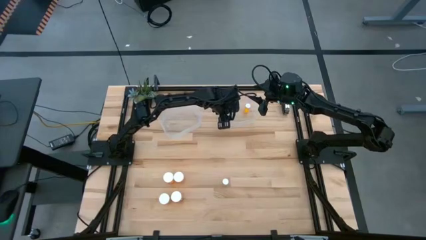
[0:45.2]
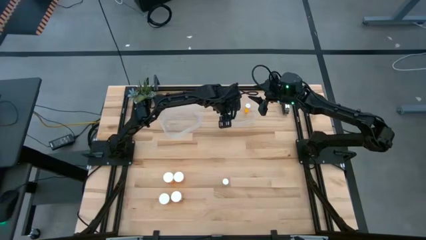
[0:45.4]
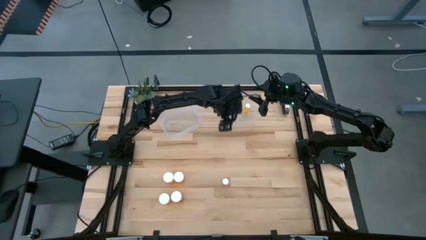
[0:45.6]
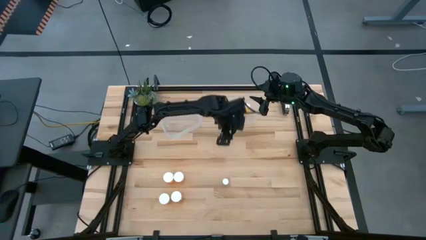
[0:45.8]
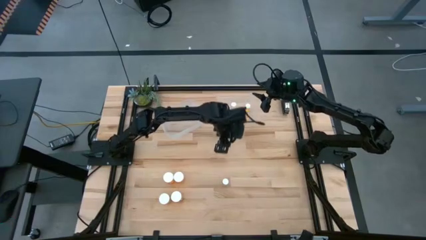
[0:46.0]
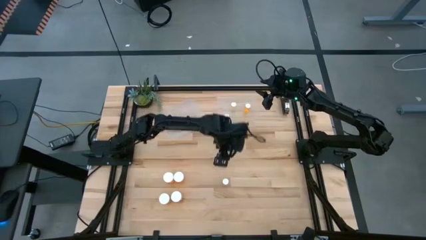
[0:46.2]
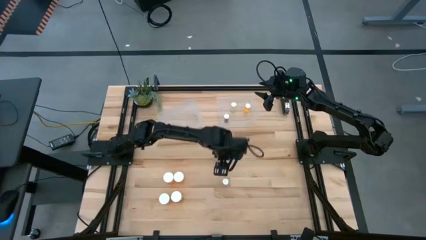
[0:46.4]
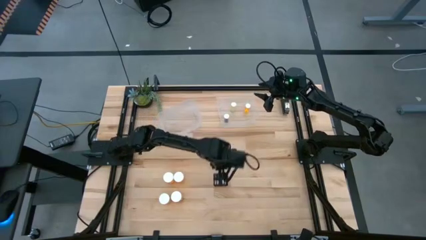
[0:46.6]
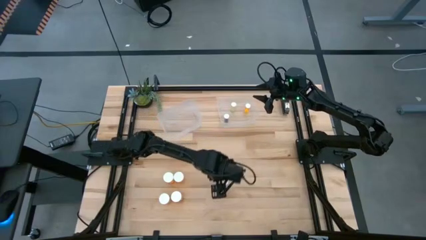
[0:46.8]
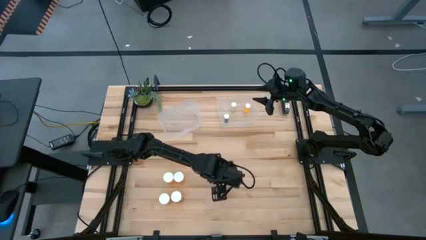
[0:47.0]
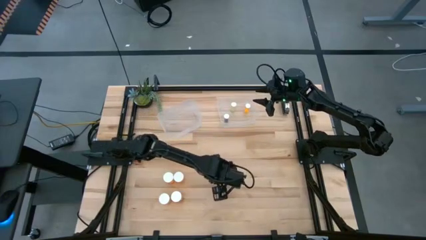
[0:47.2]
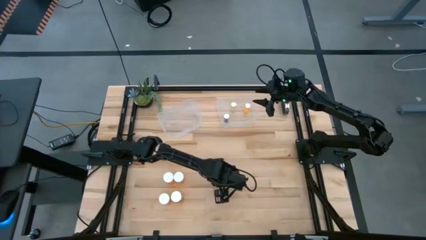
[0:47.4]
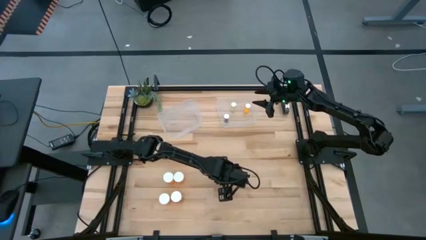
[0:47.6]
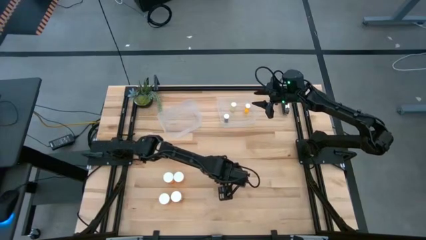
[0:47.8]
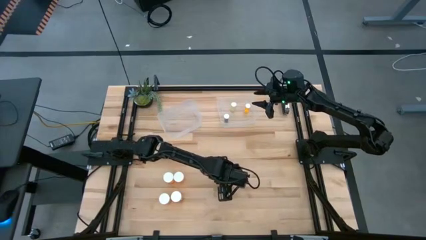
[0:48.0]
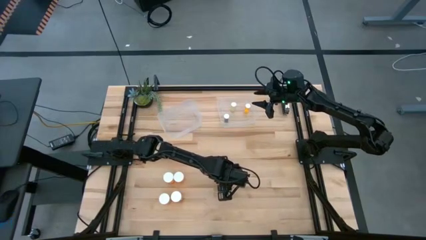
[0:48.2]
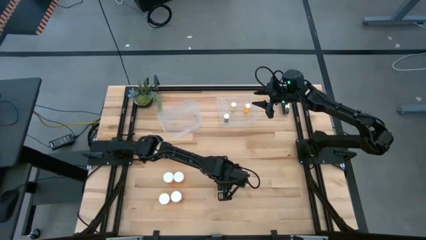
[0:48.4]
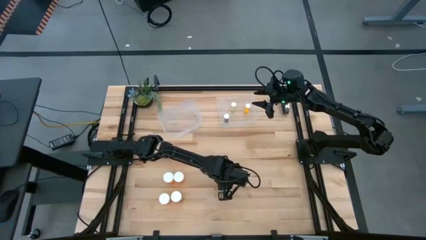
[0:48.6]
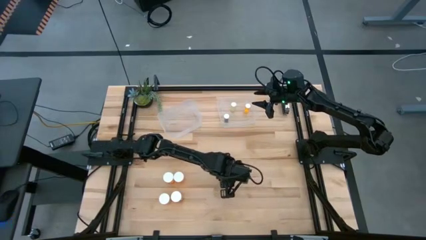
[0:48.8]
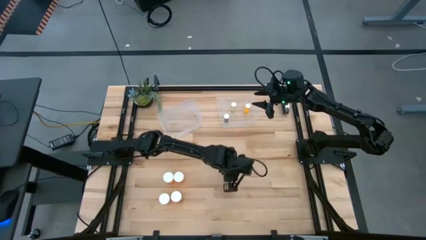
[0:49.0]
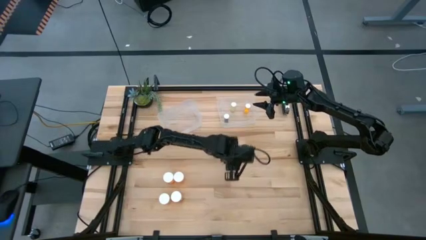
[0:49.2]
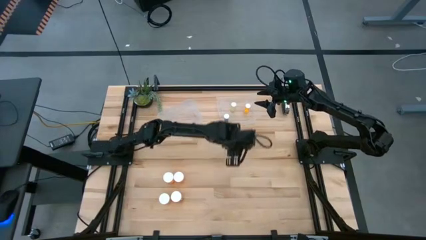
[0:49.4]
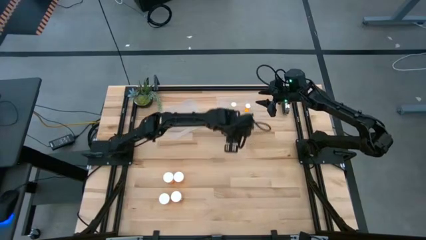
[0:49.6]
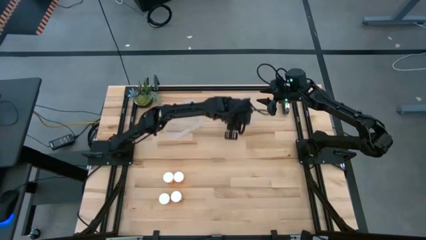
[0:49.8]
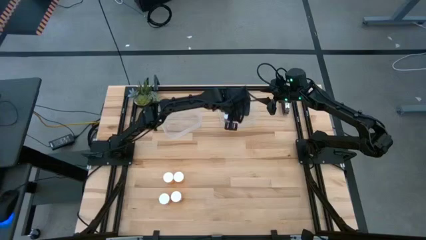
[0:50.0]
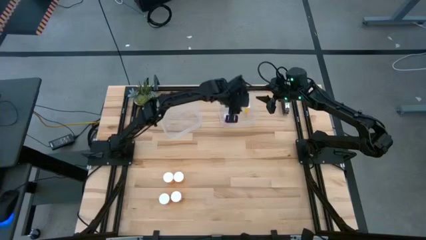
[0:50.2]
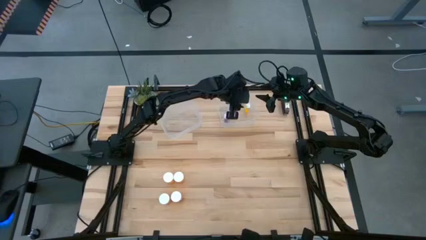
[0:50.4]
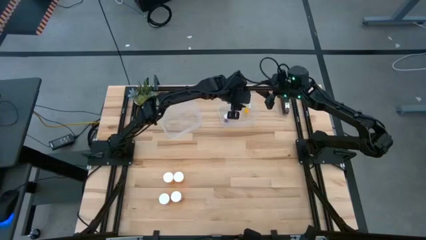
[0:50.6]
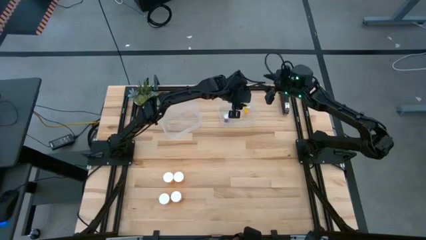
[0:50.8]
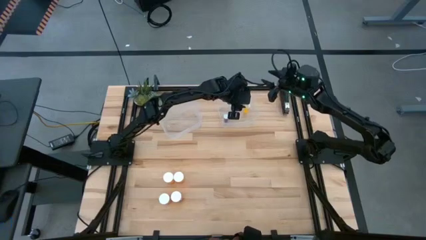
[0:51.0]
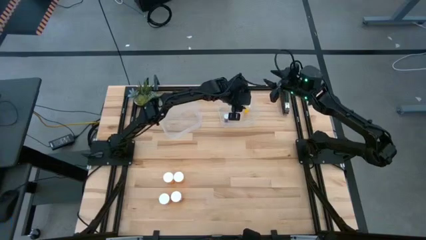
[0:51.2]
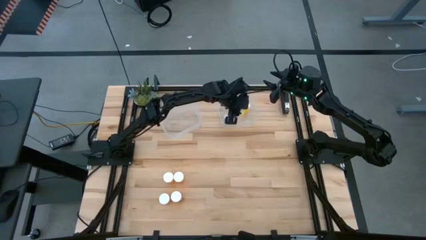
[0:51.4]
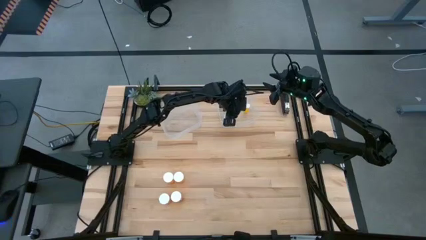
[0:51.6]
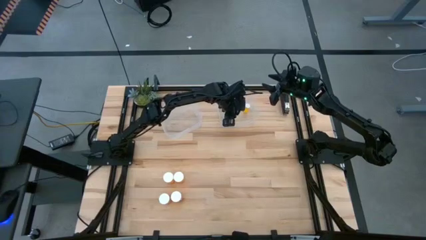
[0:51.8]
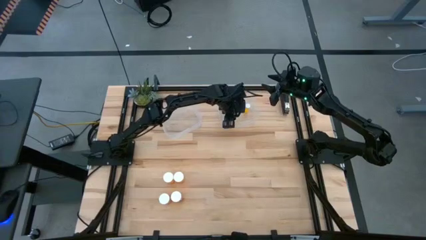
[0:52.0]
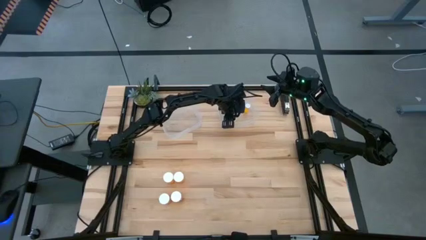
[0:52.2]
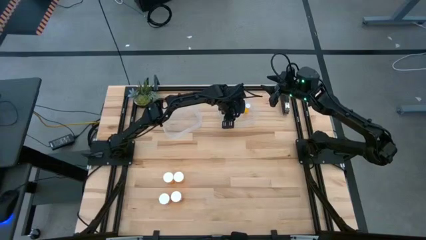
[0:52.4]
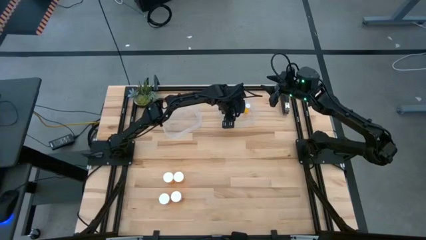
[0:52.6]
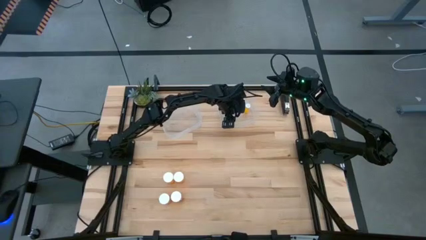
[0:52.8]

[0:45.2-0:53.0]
Task: Pick and place medicine bottles into bin by pill shape (circle, oval)
Put the yellow pill bottle into the right transparent bin

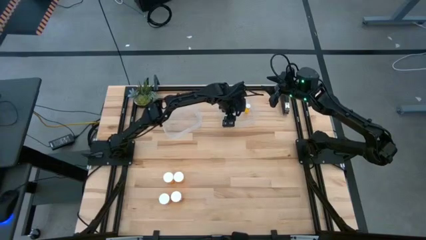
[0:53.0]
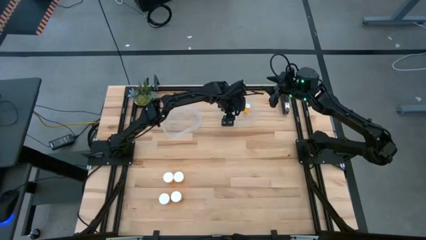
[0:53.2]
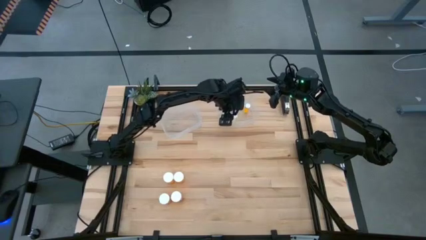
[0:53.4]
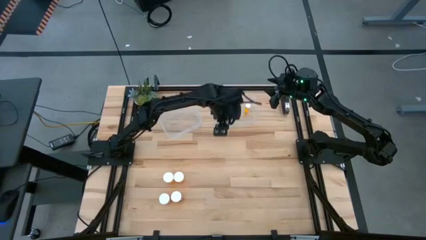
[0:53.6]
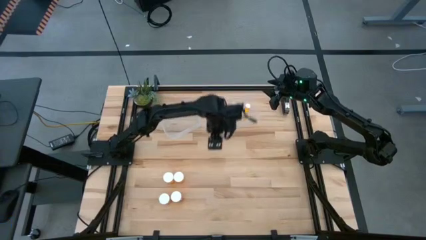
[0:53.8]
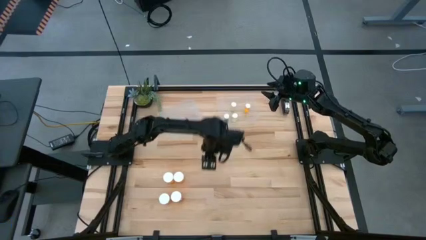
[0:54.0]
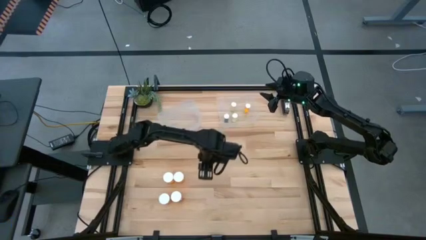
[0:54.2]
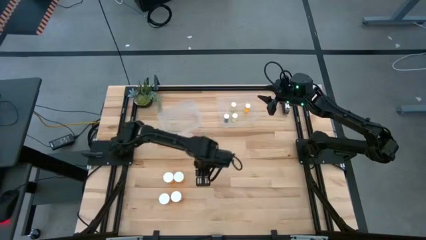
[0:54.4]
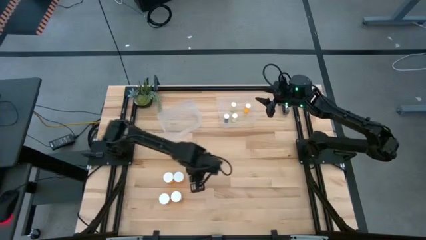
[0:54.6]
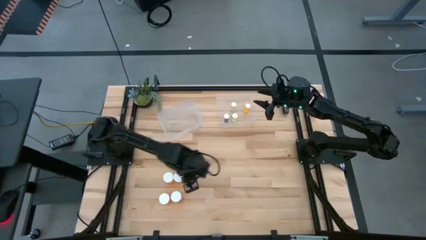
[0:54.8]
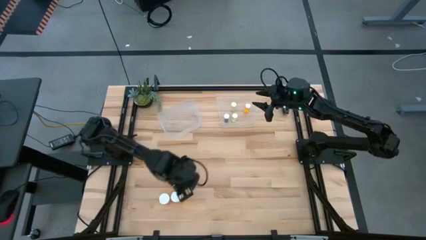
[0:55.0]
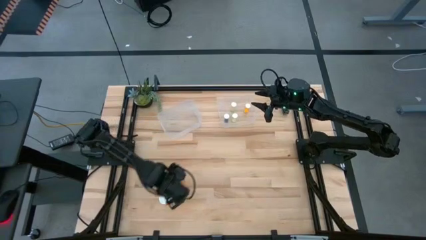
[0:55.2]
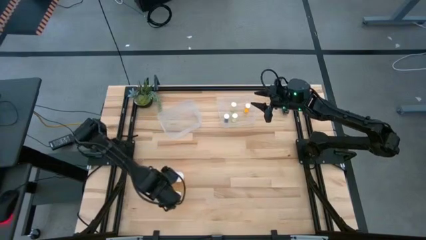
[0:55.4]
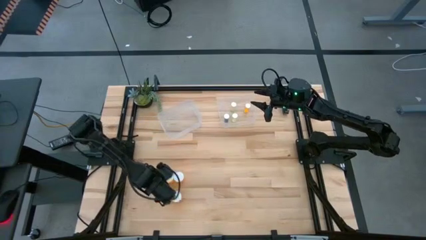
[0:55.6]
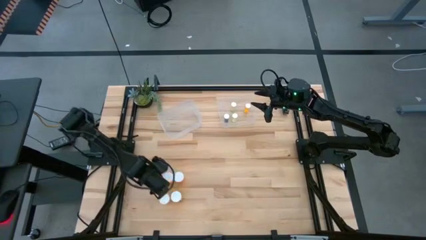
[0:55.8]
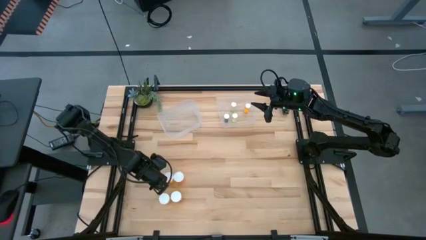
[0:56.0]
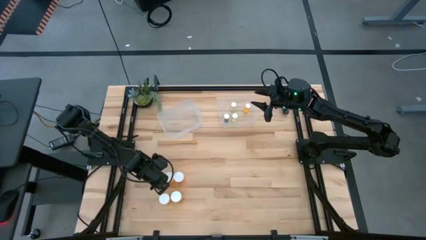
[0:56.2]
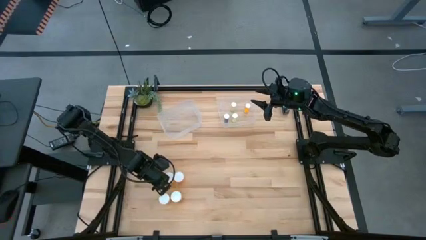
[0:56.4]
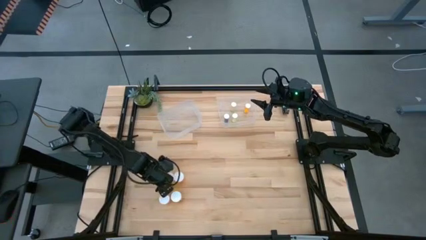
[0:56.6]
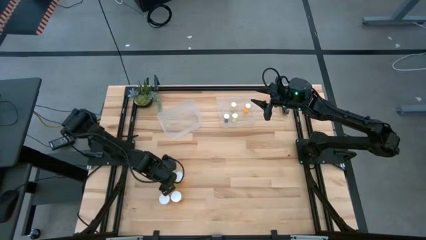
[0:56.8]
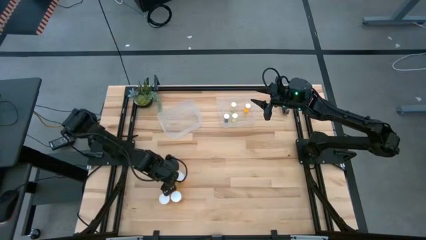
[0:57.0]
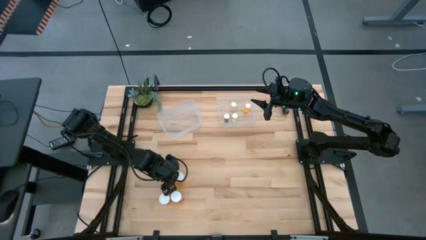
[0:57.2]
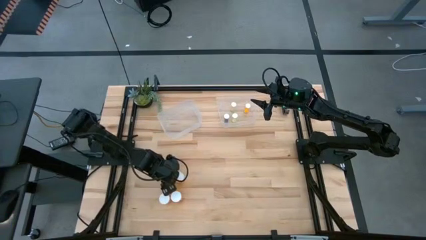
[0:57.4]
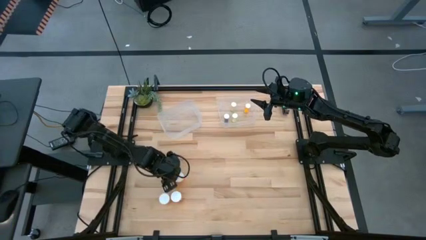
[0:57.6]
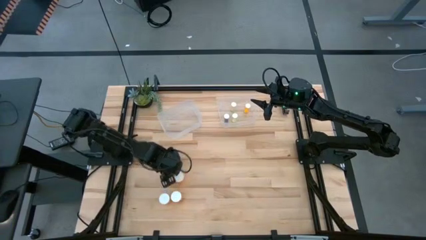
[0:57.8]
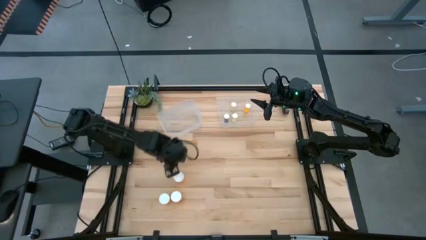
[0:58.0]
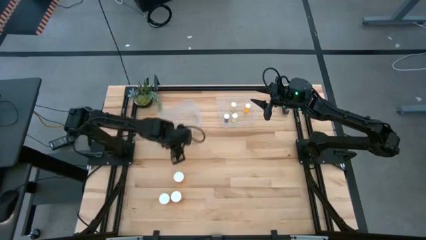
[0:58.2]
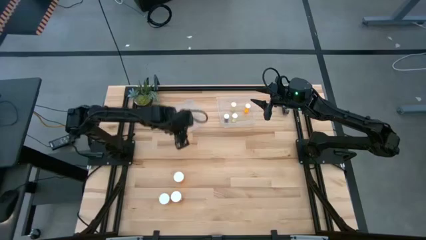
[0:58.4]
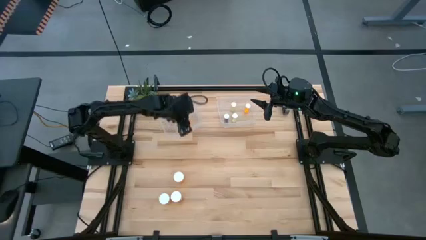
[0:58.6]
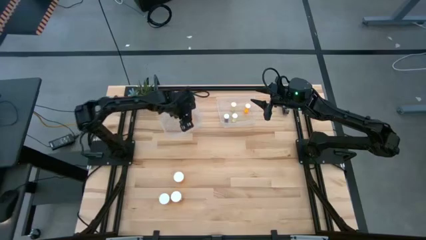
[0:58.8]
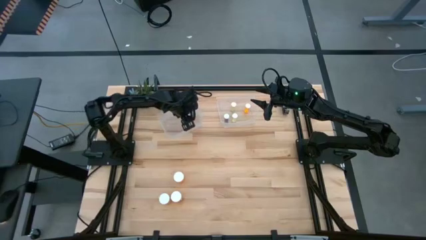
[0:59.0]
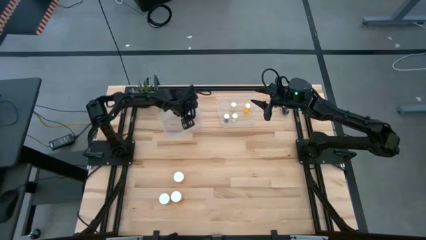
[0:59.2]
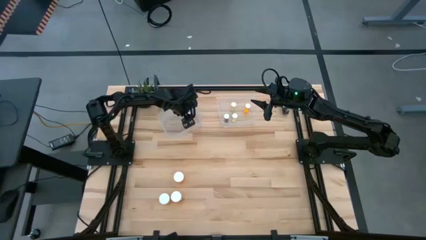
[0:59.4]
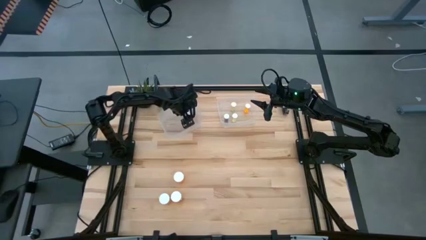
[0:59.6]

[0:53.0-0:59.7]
Put the orange pill bottle into the left transparent bin

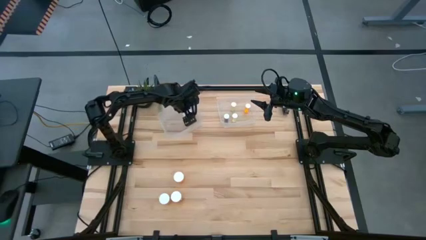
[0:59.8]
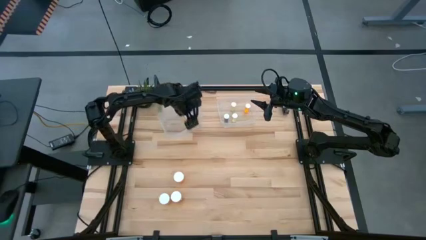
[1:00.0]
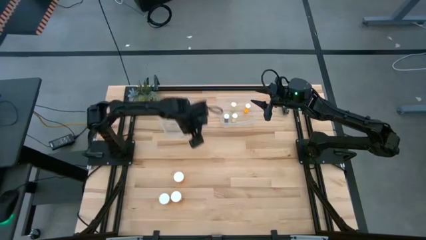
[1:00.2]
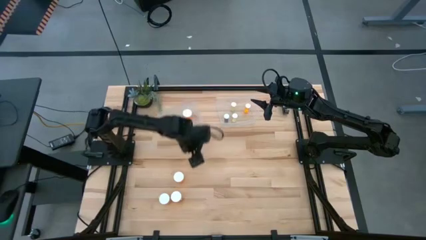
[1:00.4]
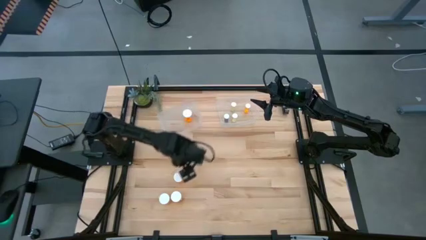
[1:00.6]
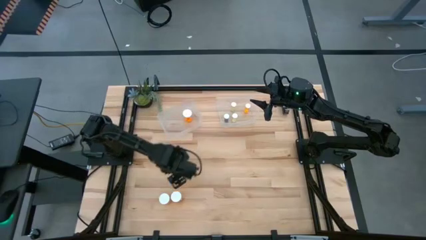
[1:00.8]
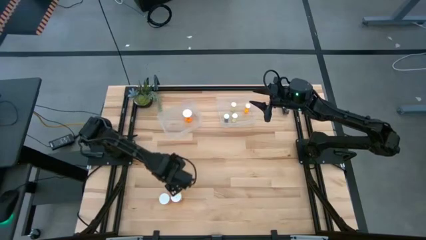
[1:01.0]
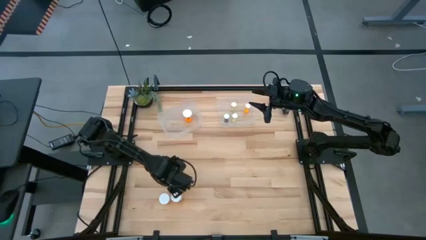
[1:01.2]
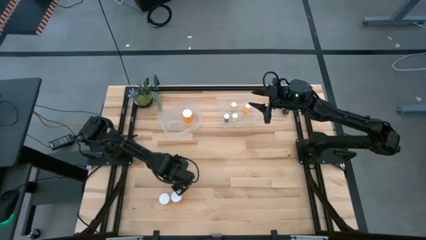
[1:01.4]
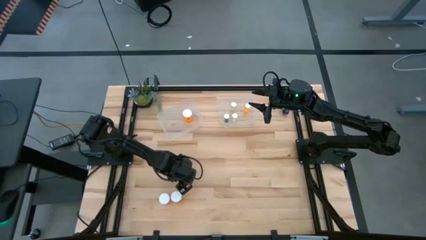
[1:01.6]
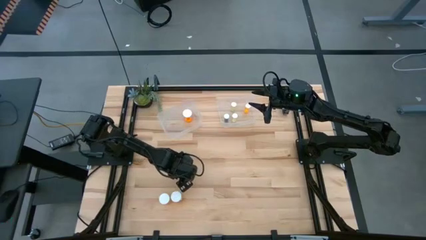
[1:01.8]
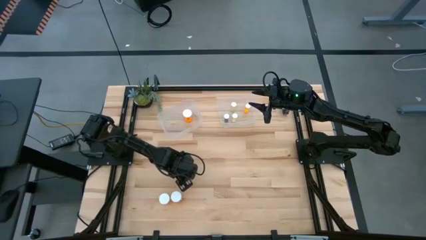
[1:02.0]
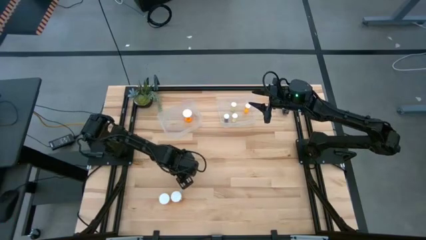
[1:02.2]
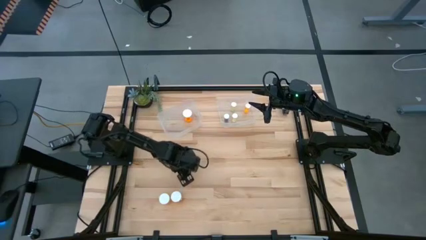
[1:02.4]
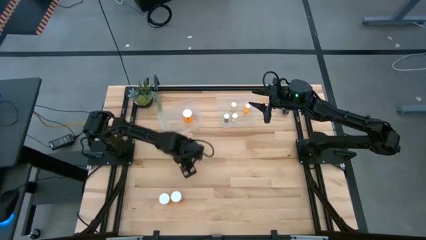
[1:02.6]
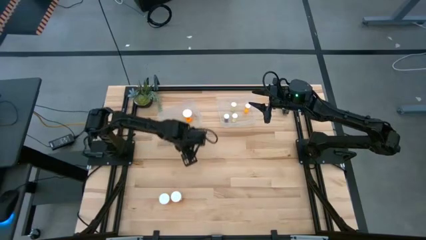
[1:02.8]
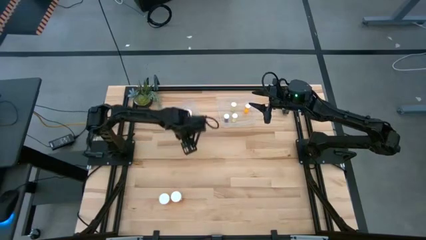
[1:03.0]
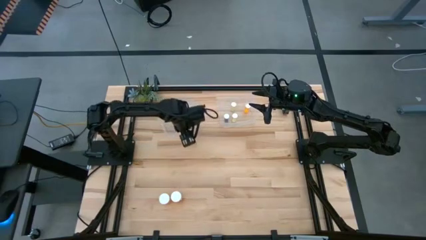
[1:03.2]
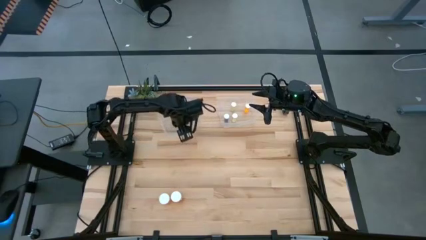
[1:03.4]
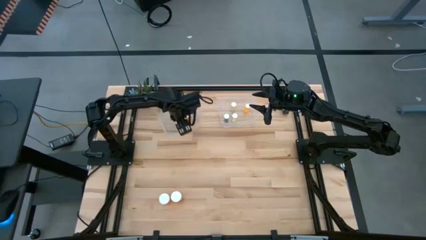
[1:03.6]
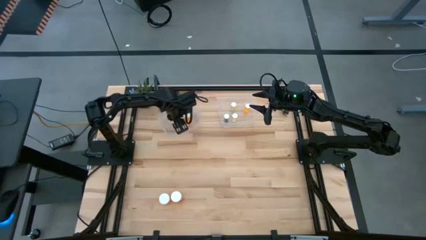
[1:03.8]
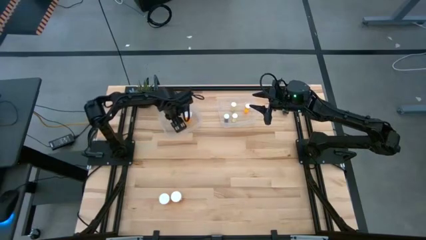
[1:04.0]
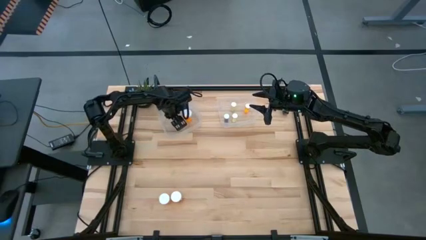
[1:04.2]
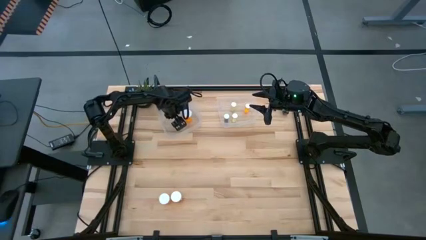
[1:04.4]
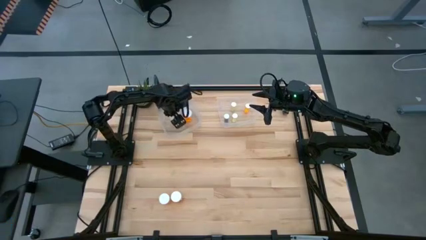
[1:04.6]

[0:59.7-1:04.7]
Put the orange pill bottle into the left transparent bin
